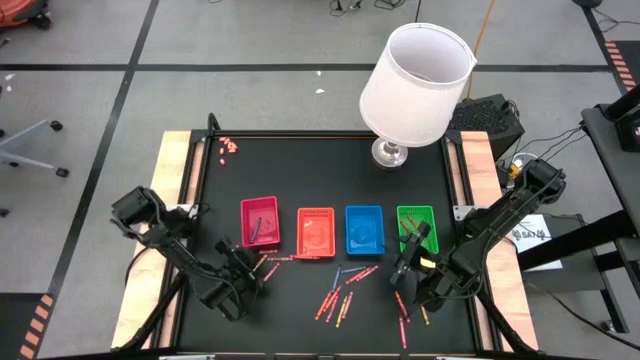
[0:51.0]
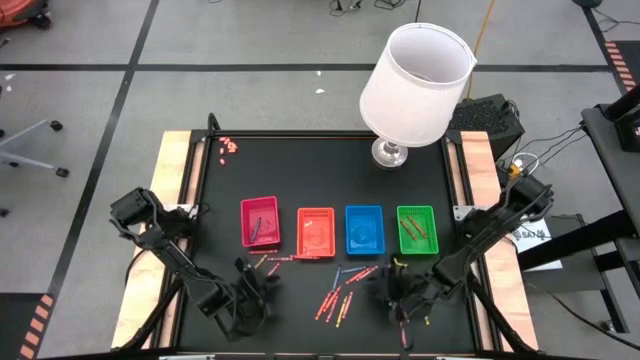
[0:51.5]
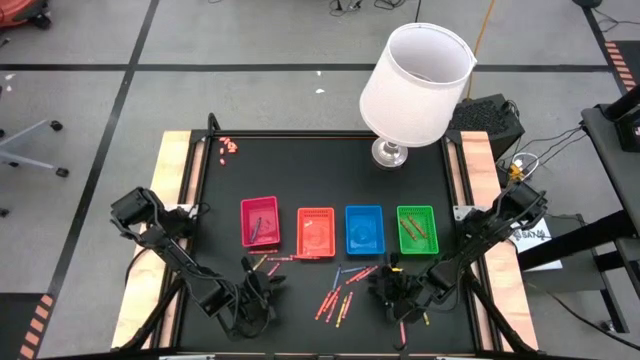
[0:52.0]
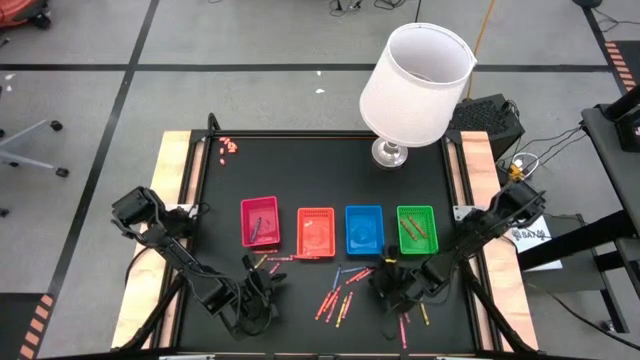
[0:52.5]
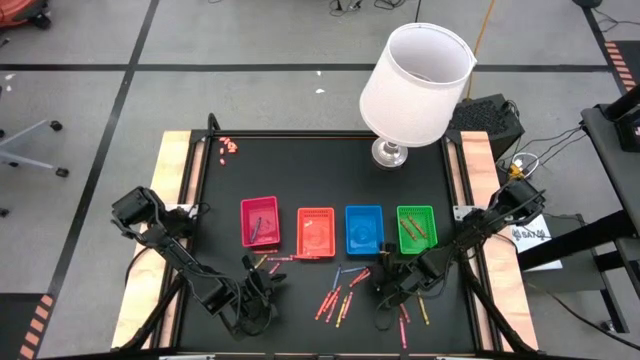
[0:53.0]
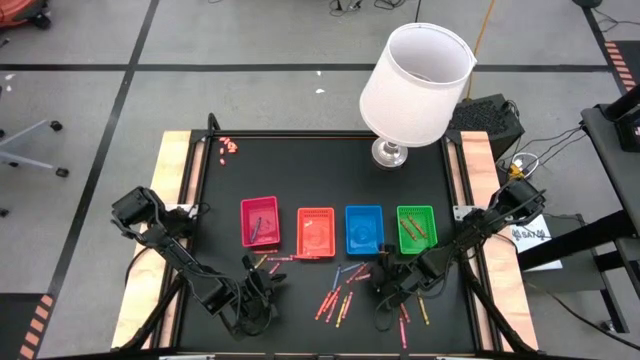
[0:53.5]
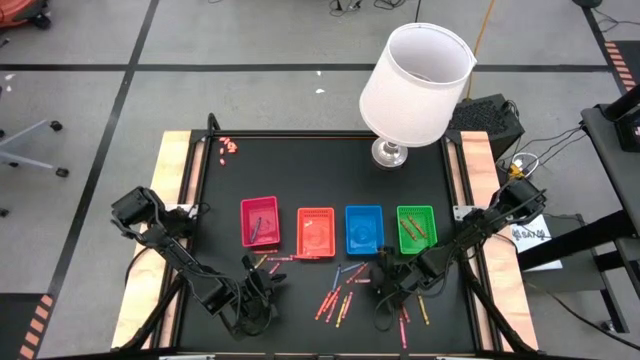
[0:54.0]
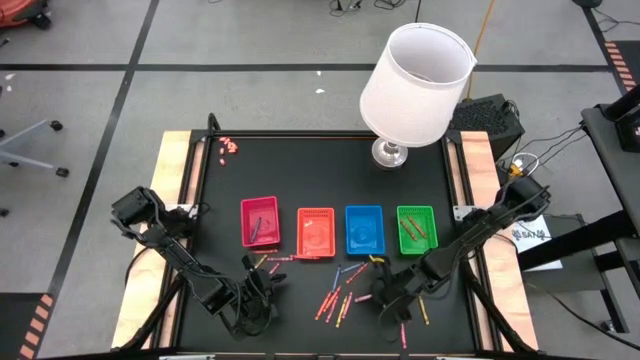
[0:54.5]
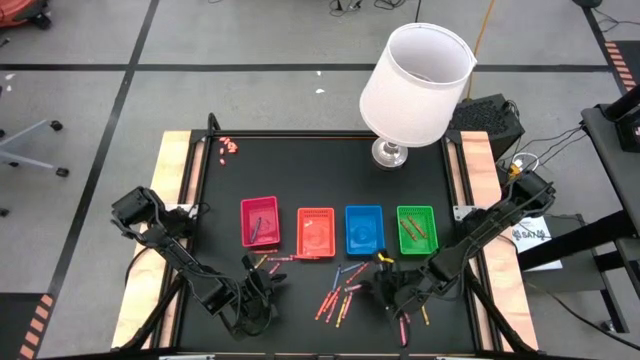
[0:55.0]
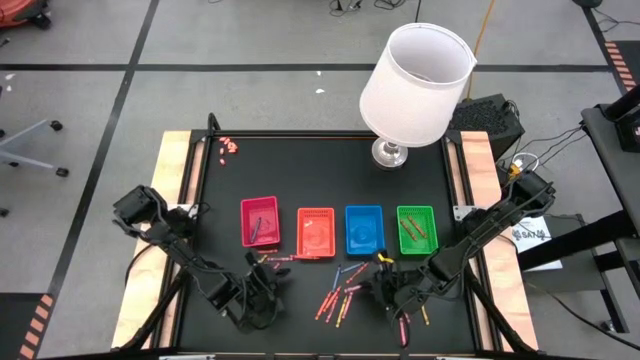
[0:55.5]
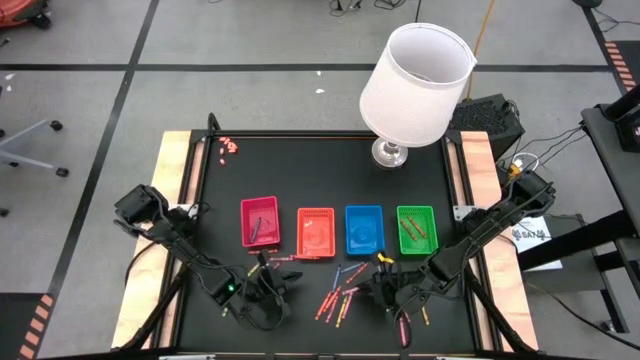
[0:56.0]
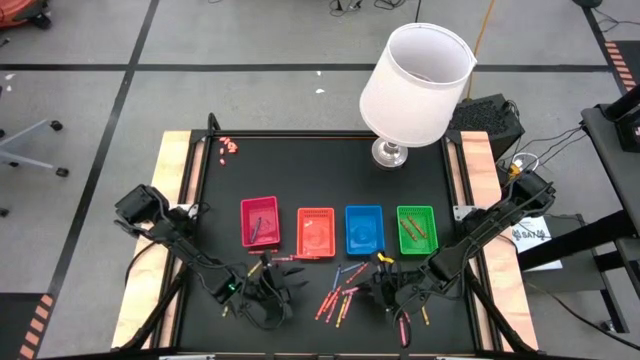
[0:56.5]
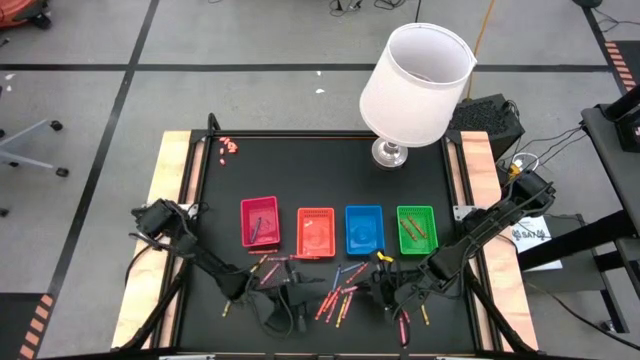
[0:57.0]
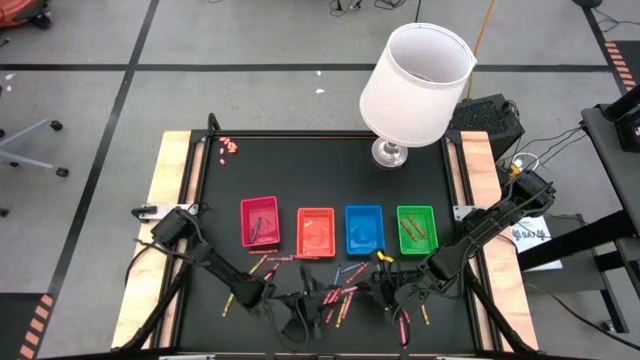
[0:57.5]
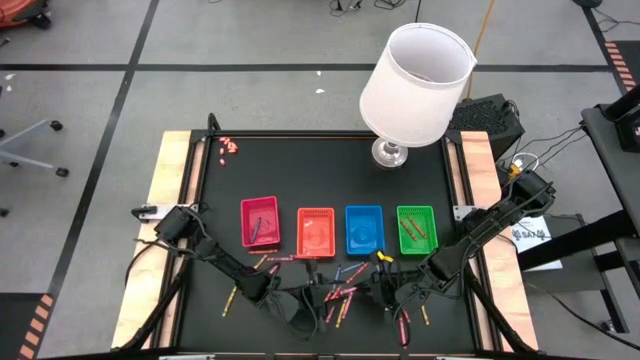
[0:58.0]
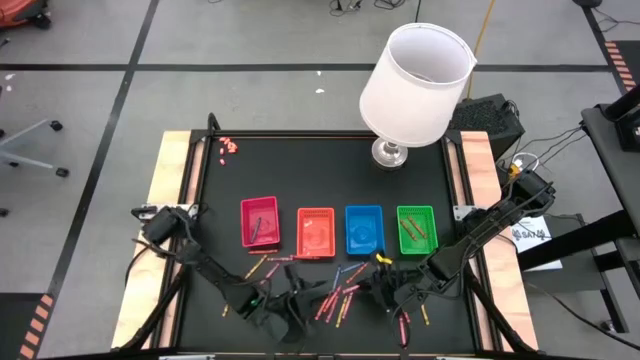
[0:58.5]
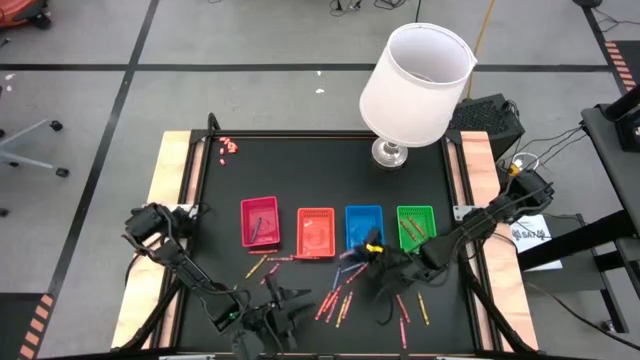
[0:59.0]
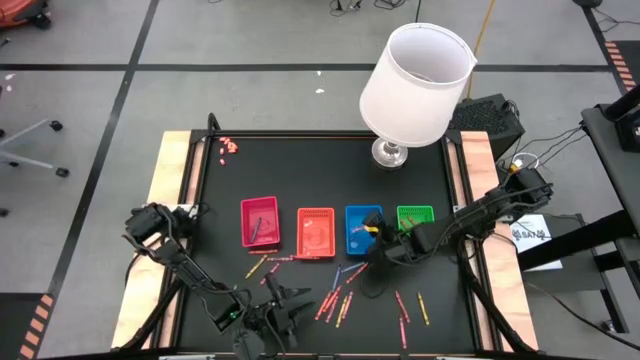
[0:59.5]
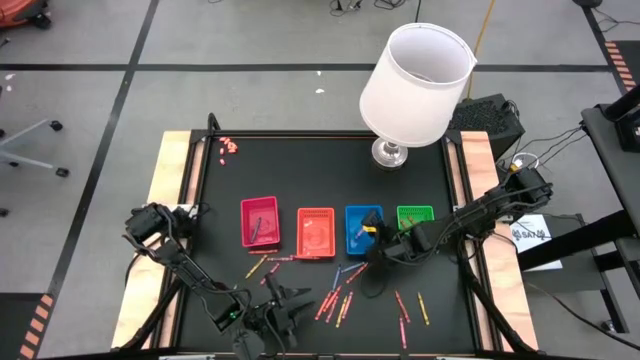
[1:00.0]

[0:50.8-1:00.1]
Task: Sort crayons
Put the red crayon into the blue bin

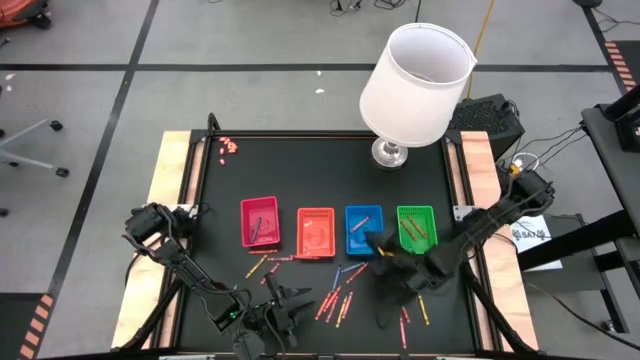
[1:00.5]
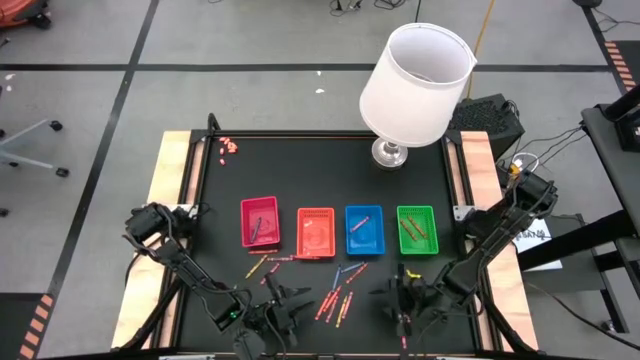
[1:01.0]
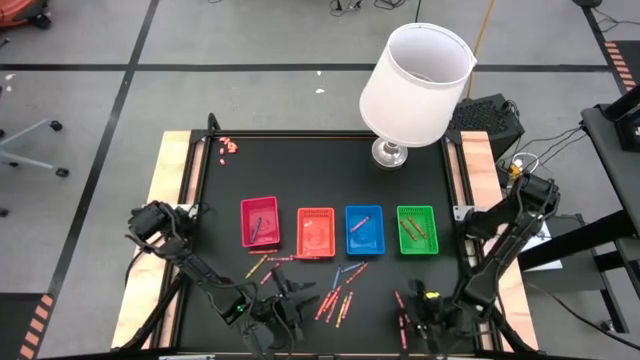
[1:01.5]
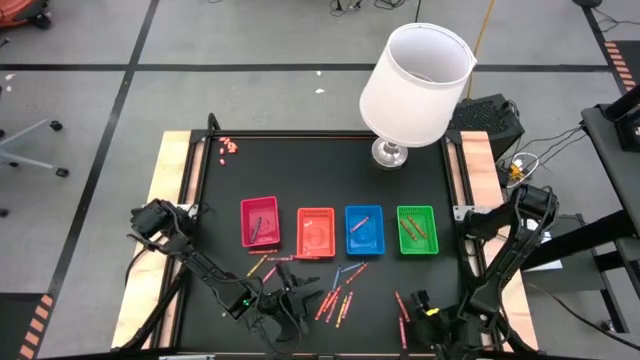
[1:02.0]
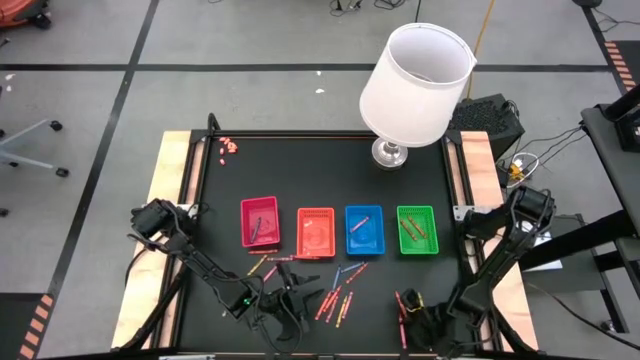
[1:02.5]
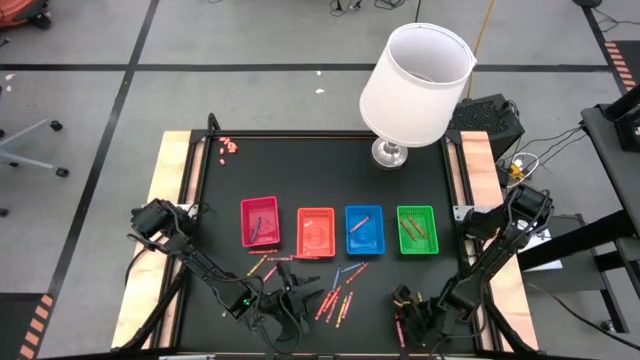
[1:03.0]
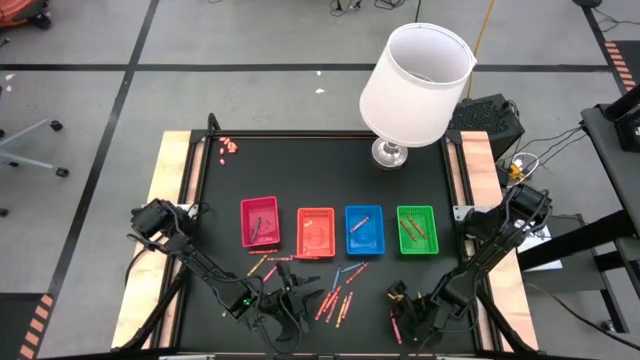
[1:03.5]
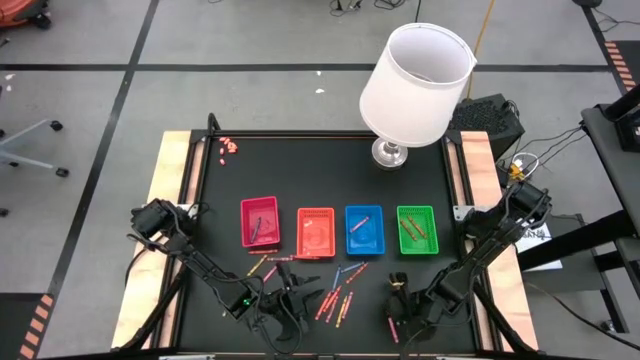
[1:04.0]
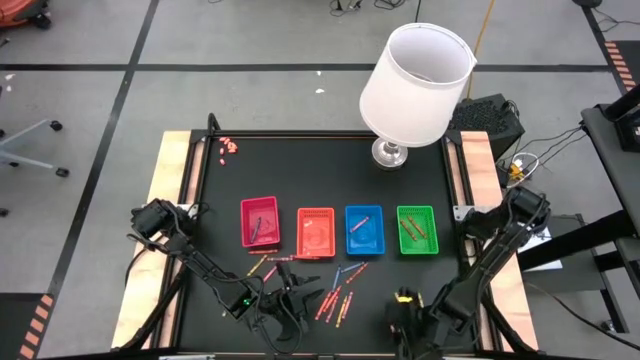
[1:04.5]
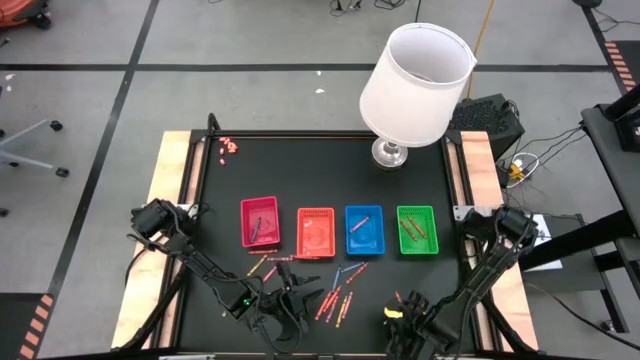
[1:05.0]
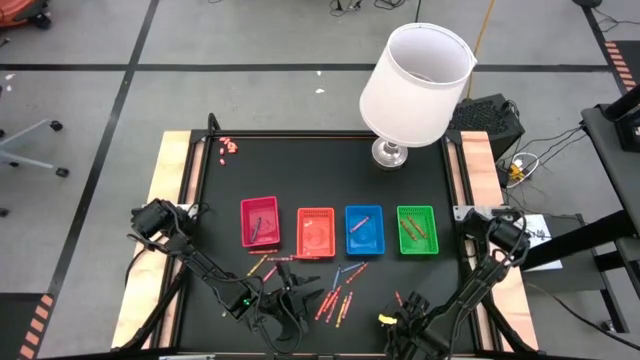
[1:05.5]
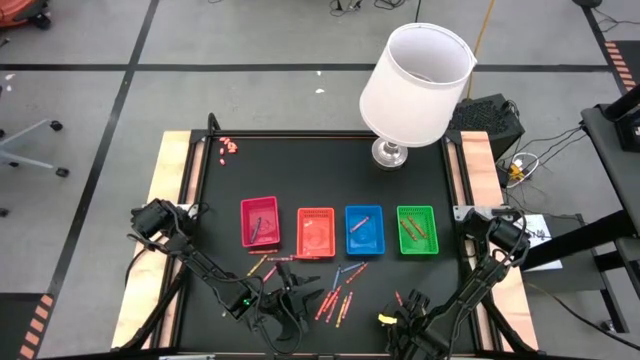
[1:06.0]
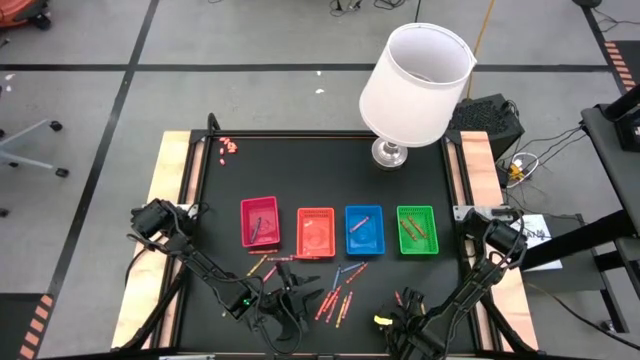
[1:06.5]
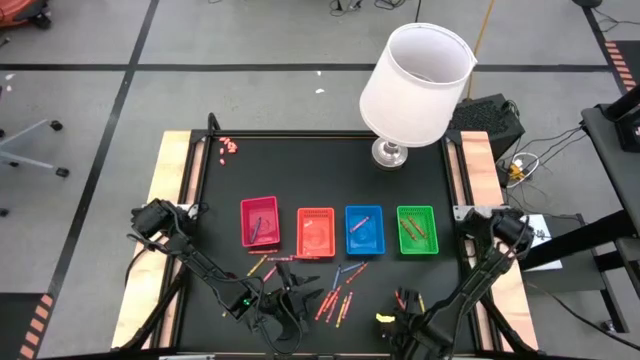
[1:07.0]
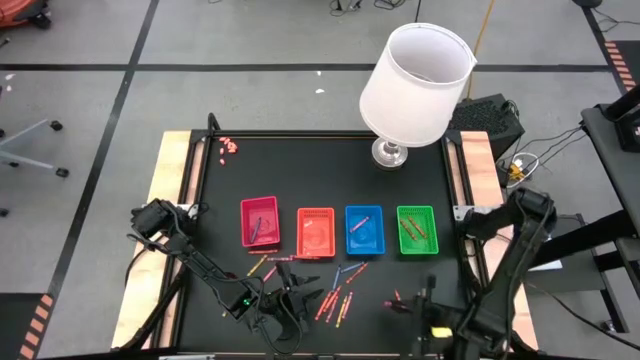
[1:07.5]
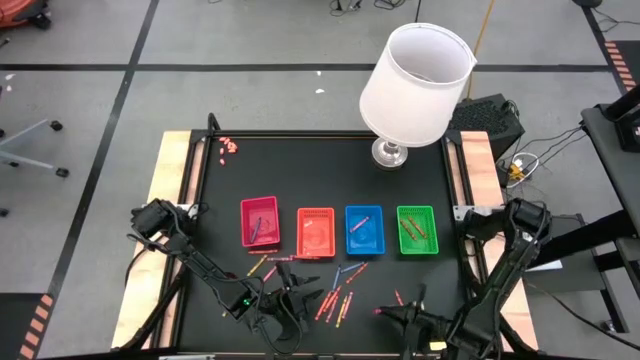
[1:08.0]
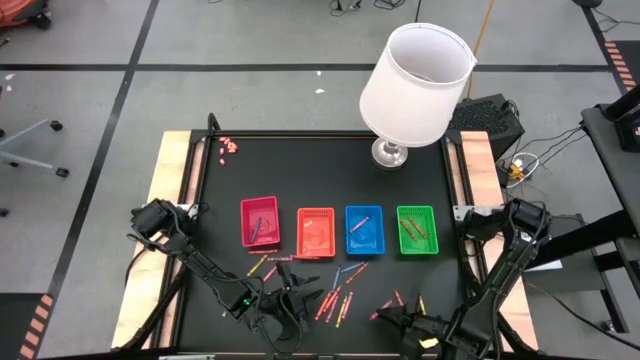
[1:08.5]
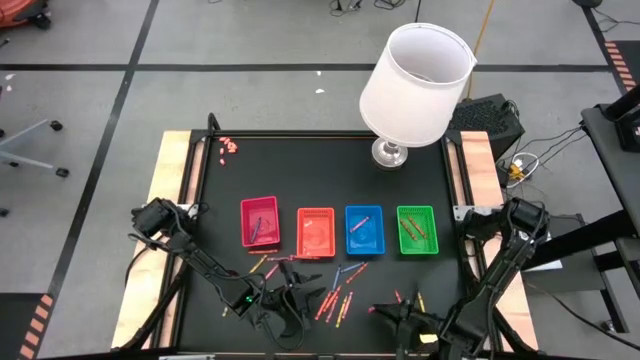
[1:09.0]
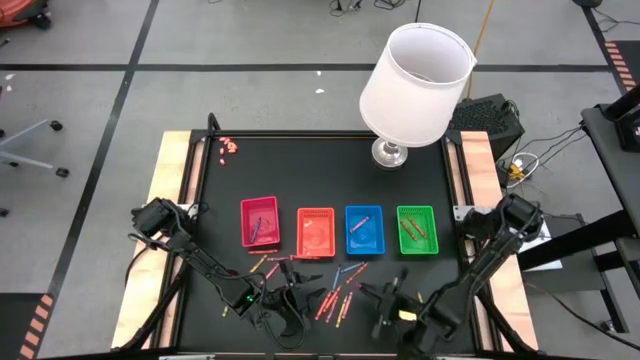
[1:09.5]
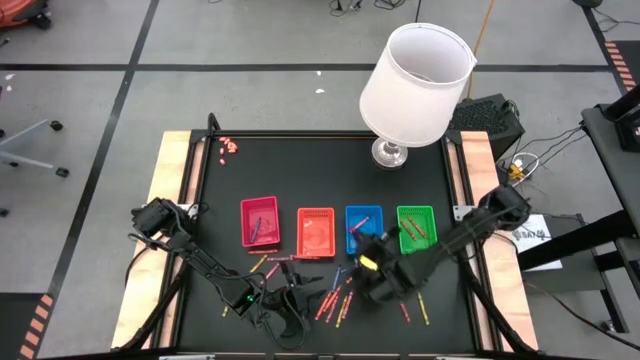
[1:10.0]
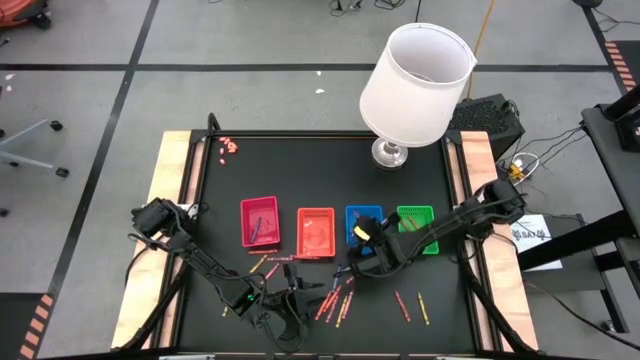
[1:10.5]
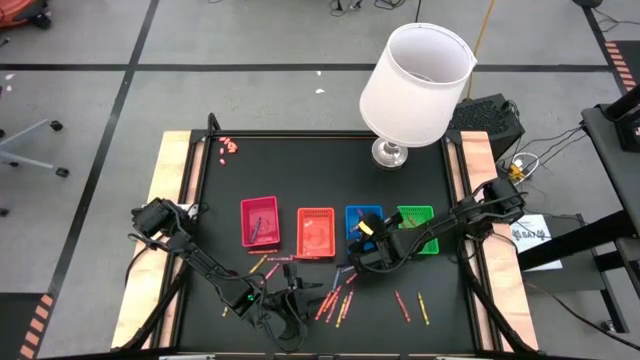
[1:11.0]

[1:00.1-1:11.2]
Put the red crayon into the blue bin
